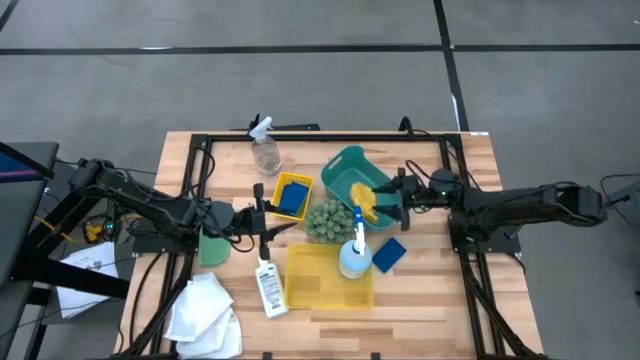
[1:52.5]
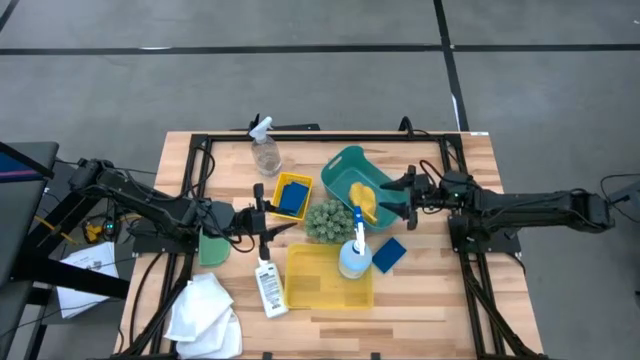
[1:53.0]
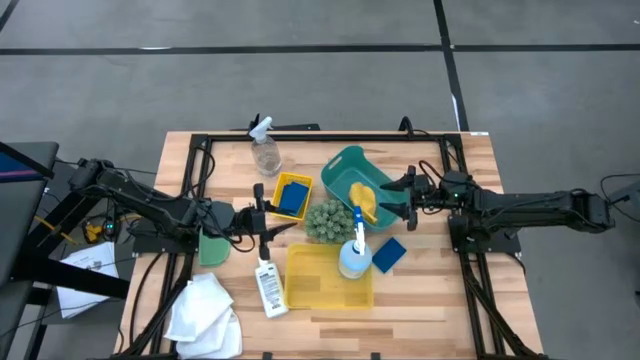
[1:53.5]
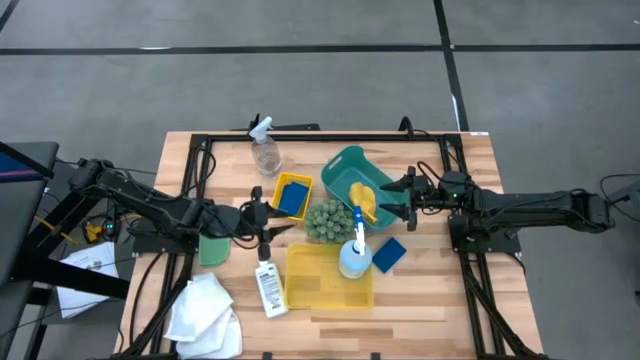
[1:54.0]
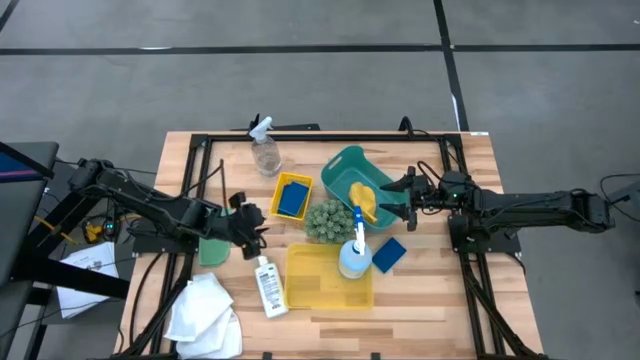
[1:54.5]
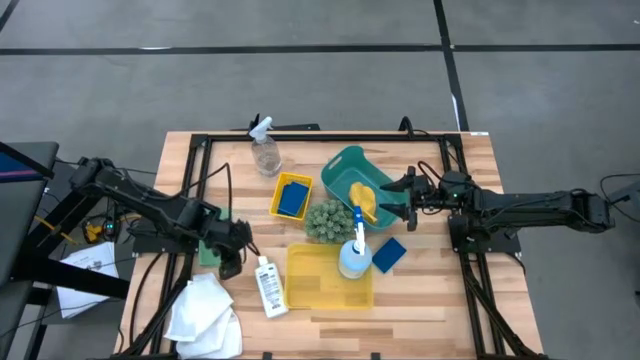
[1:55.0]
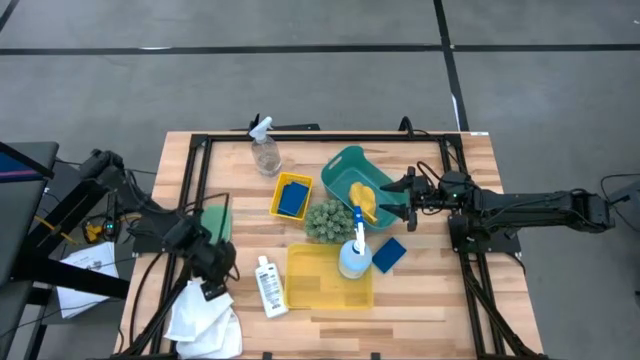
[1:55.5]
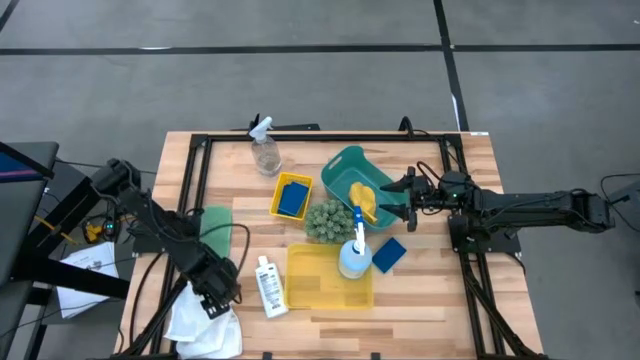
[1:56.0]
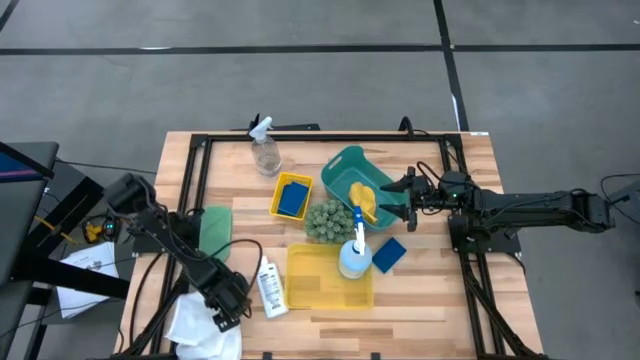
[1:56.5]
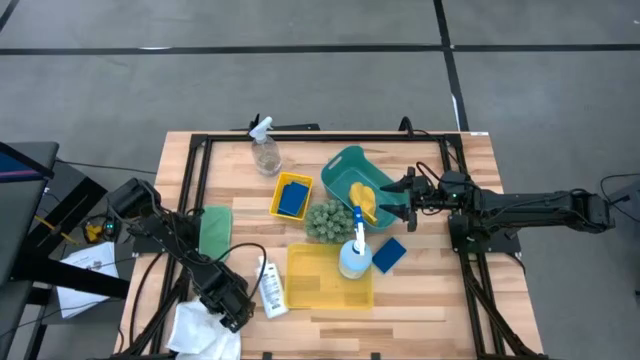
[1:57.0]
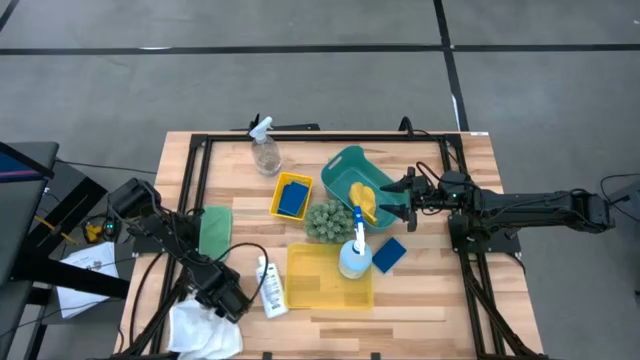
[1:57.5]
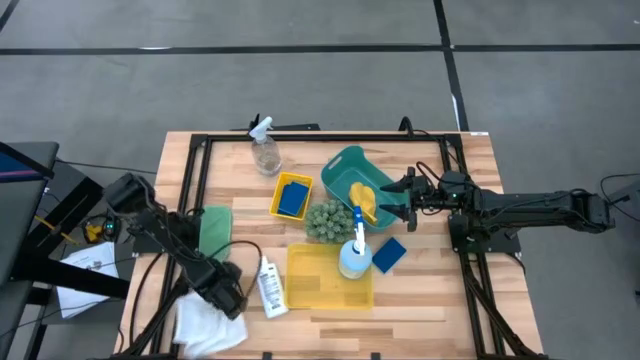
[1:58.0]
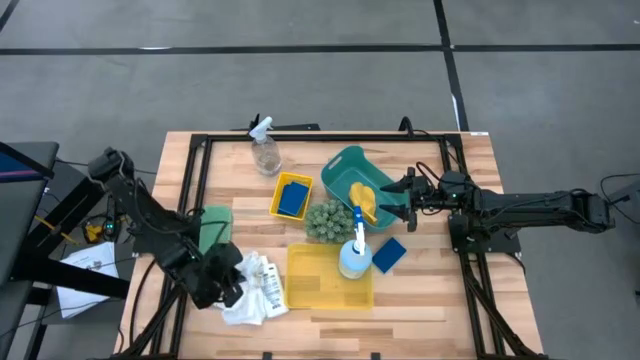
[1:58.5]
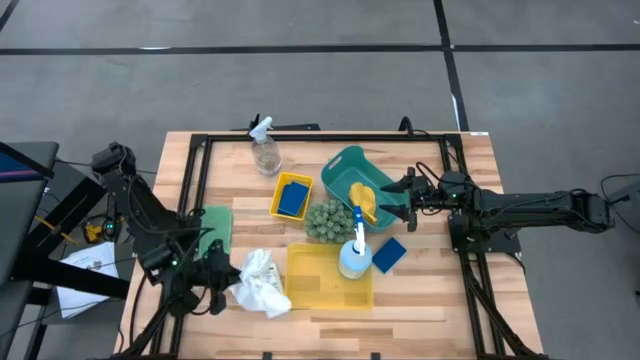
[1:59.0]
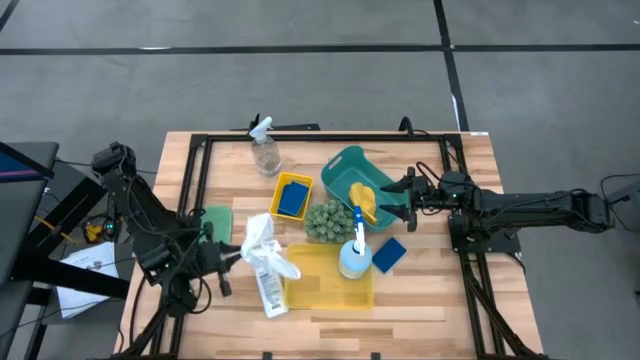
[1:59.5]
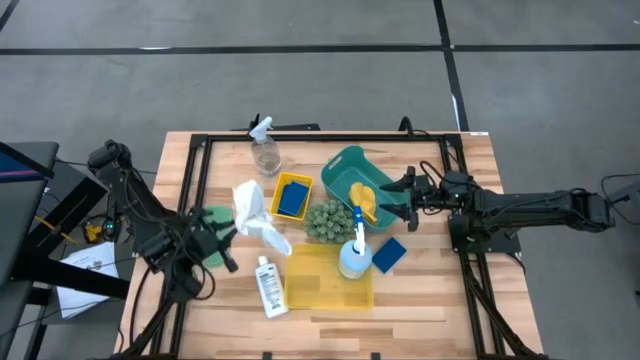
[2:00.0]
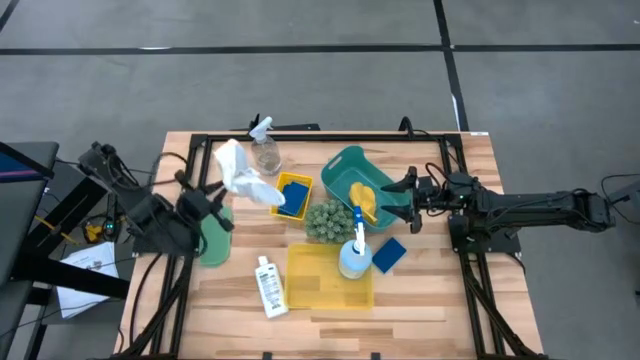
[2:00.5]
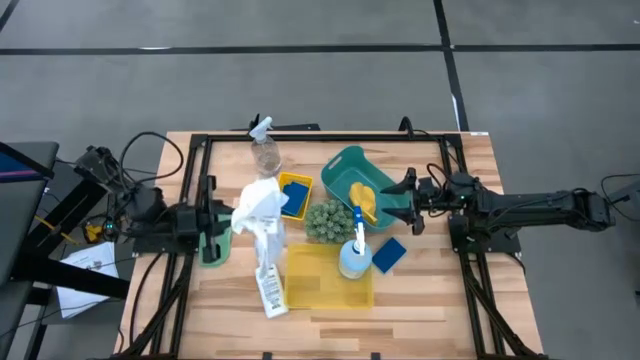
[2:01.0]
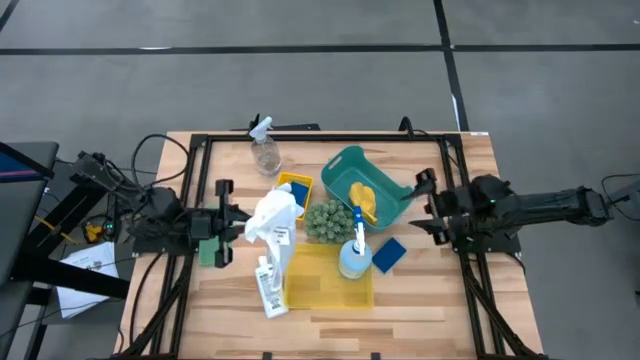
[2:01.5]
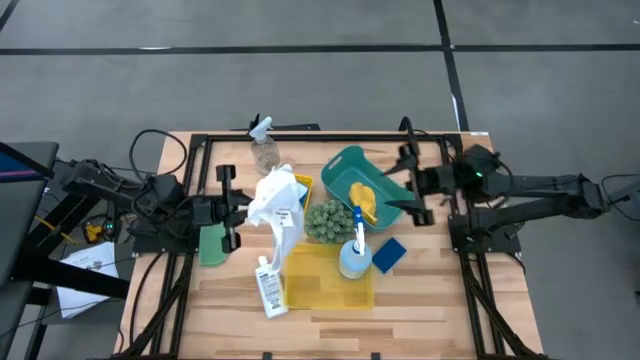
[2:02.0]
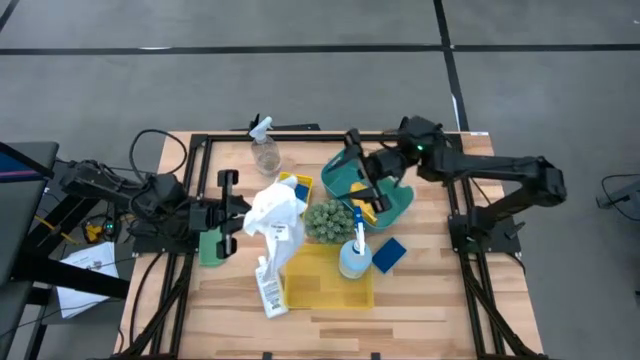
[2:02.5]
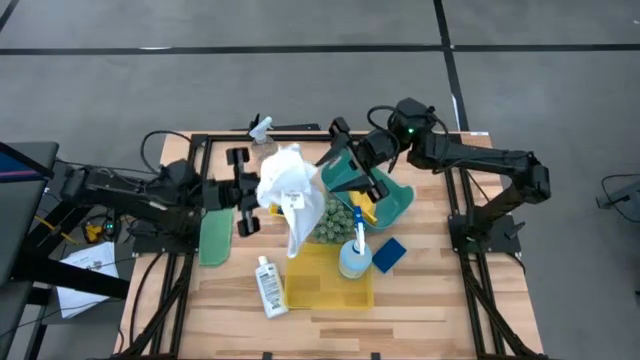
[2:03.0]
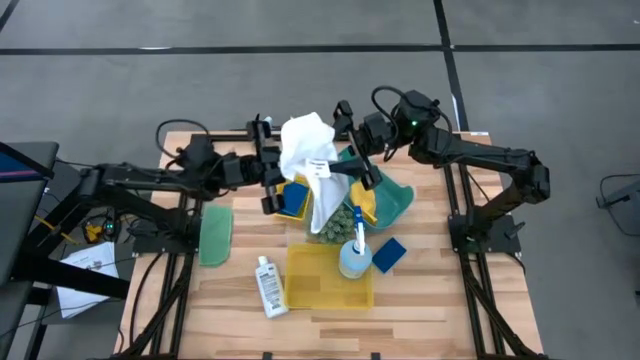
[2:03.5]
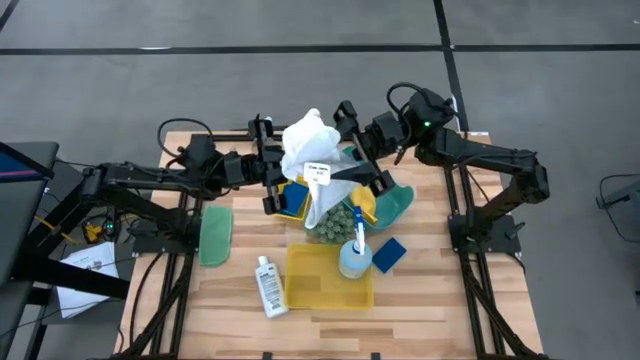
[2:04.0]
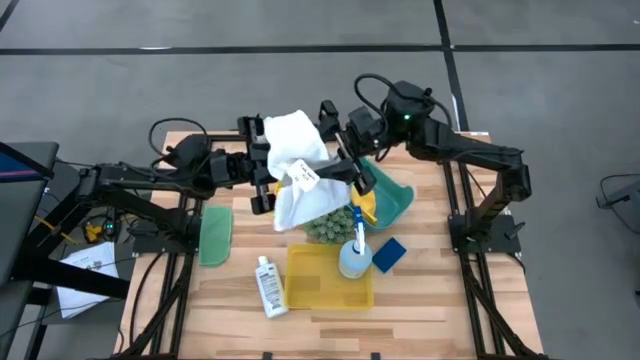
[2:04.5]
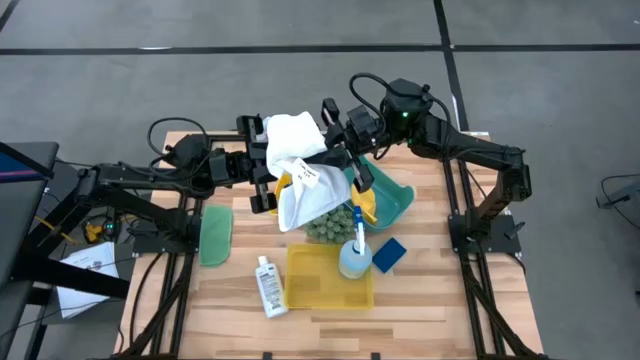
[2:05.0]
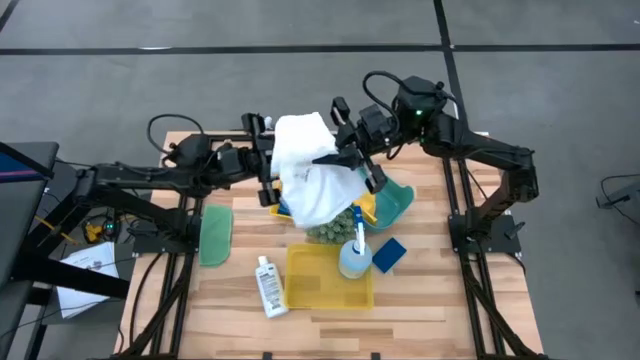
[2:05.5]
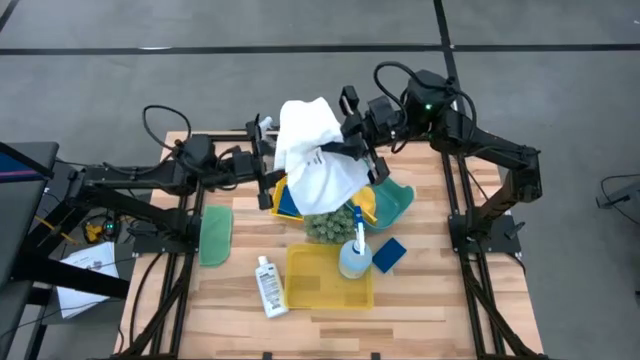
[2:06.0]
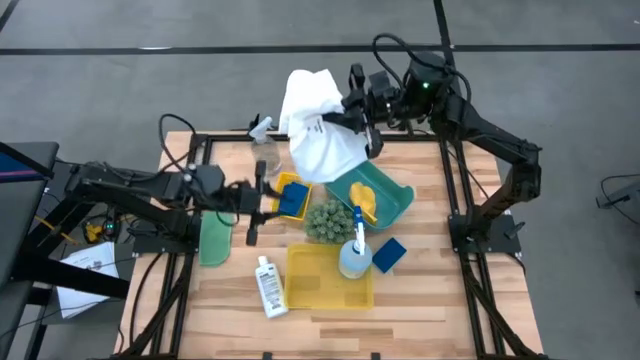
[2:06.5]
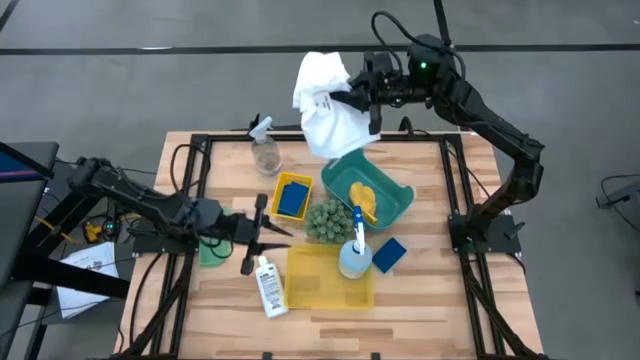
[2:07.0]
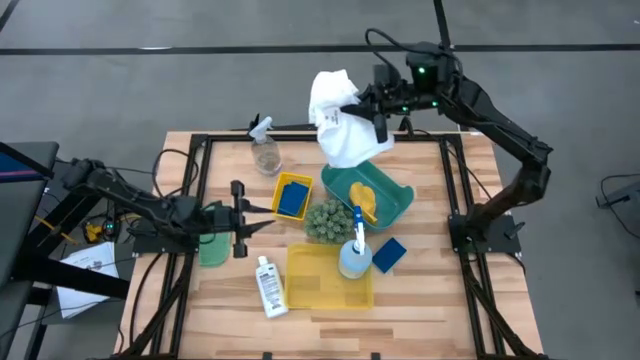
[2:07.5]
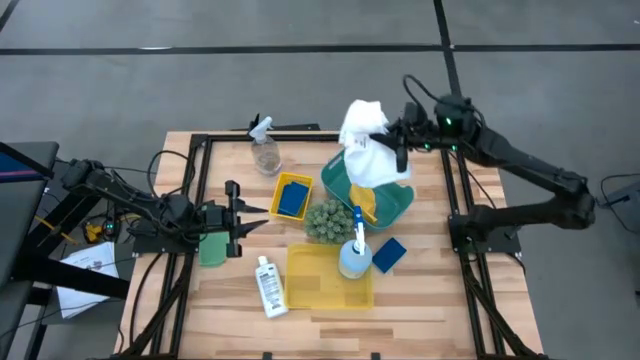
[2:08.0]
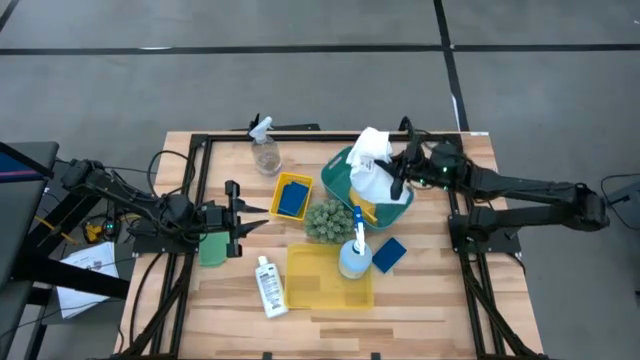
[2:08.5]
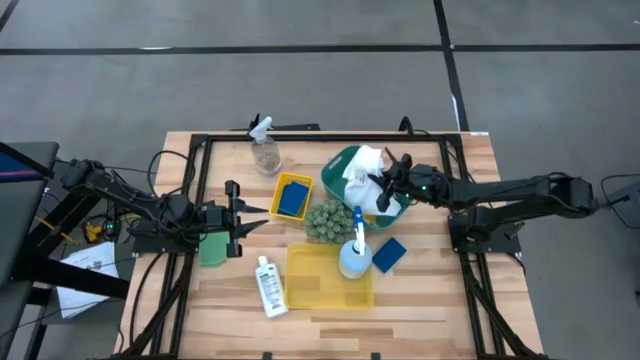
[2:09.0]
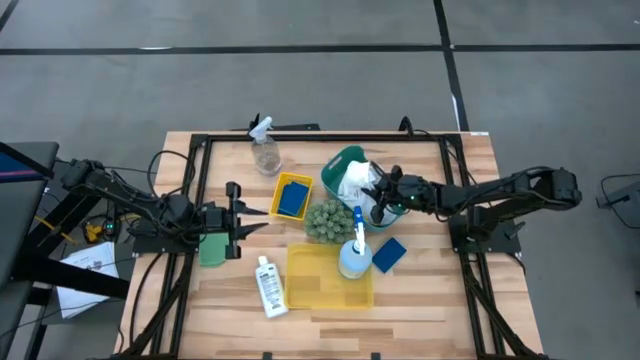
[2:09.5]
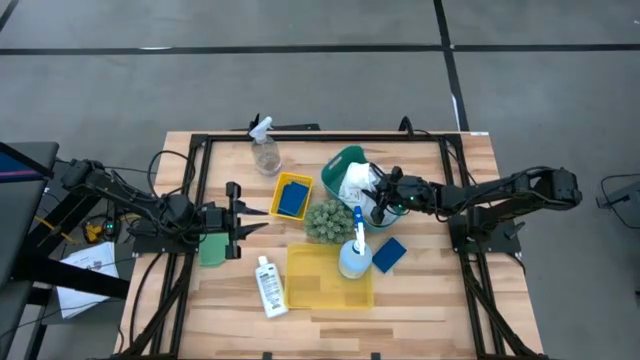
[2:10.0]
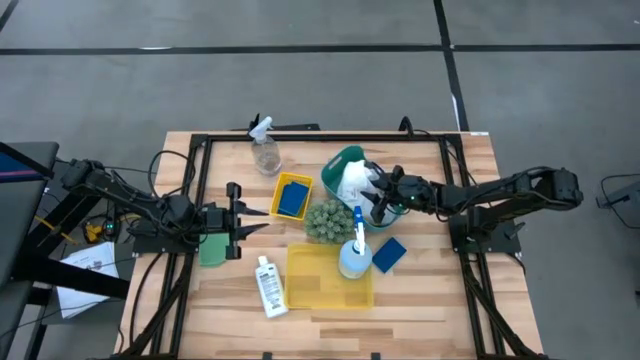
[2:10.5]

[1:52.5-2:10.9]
Task: Pick & Place Kitchen Items
Put the white microfiber cloth into the green bin
